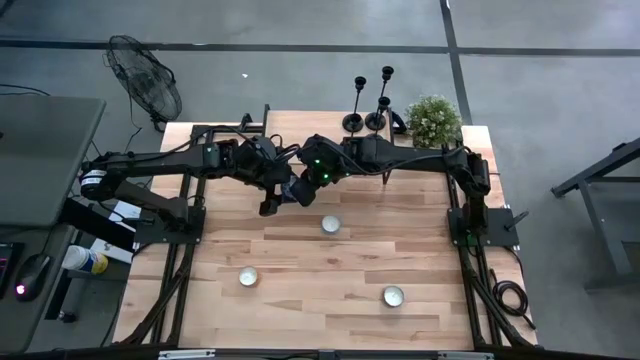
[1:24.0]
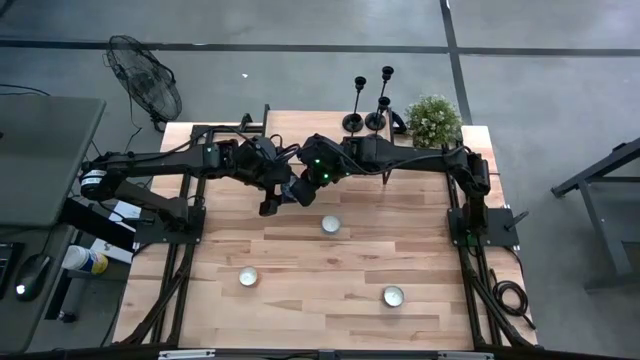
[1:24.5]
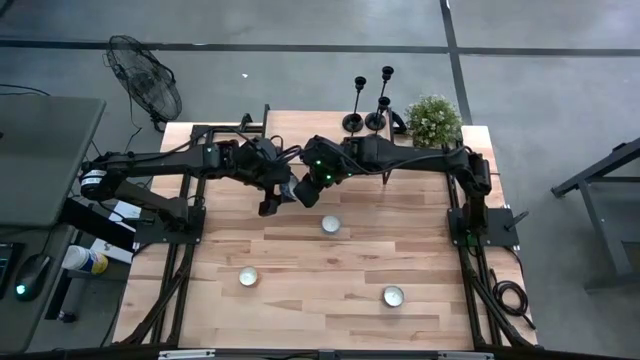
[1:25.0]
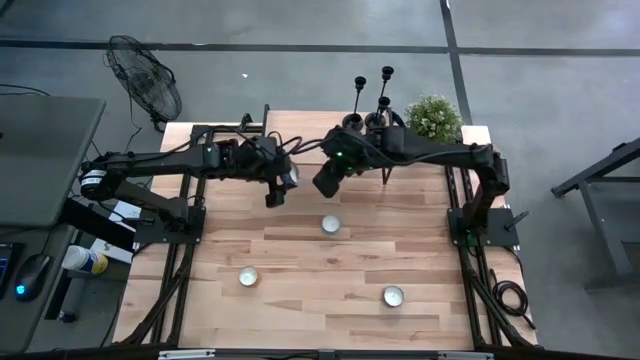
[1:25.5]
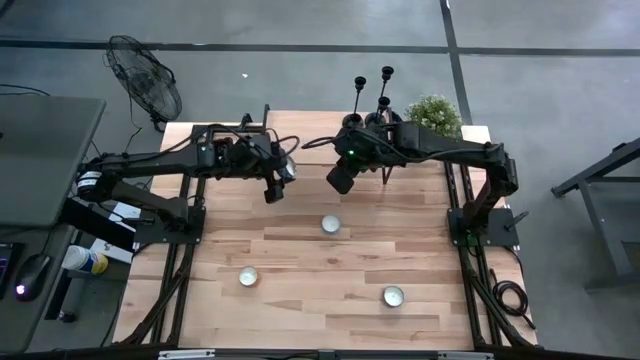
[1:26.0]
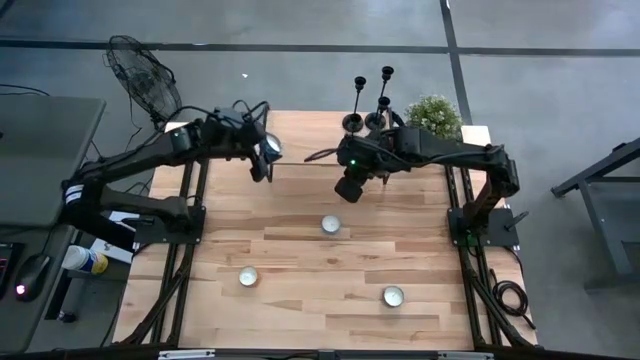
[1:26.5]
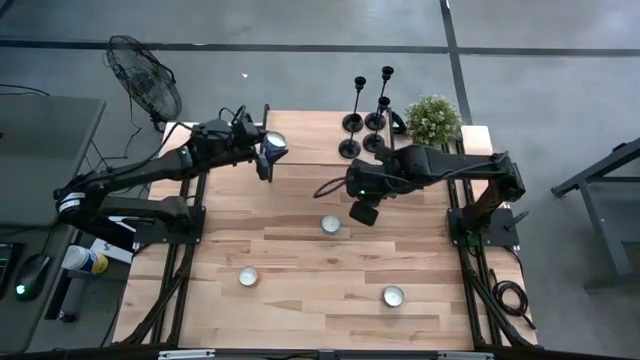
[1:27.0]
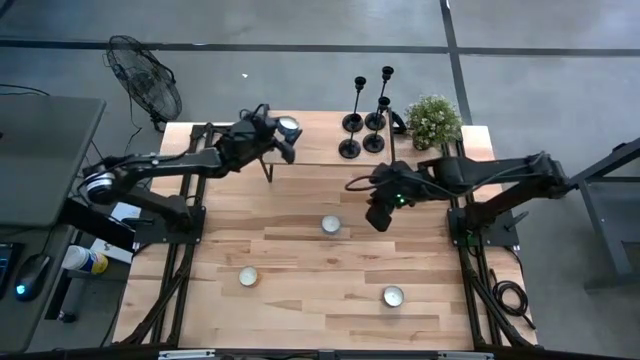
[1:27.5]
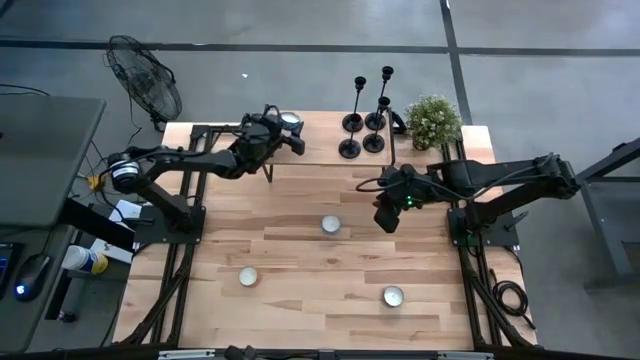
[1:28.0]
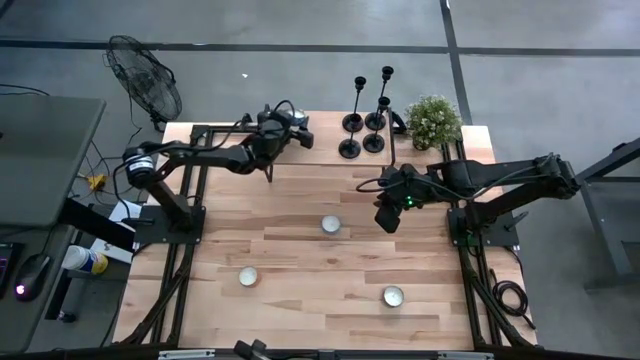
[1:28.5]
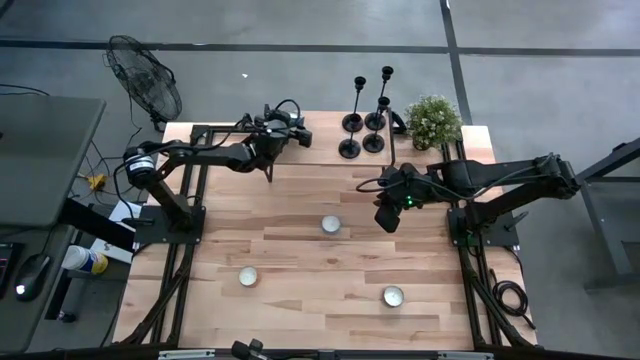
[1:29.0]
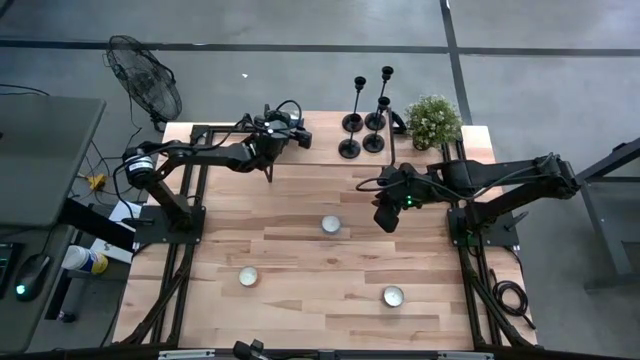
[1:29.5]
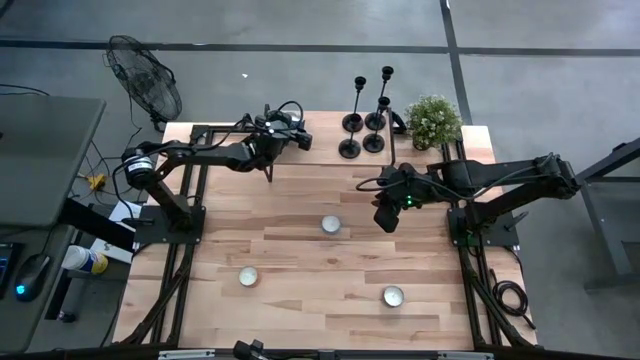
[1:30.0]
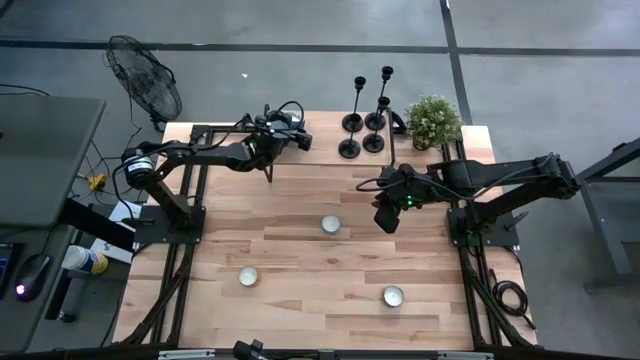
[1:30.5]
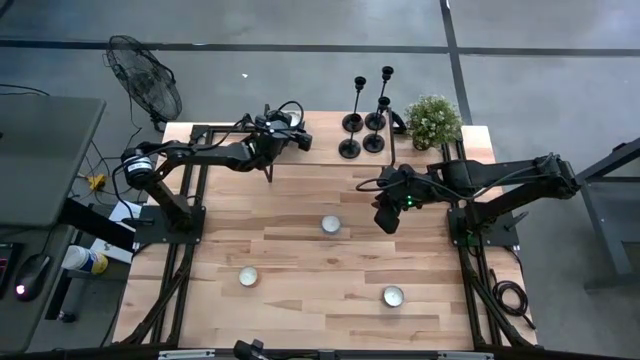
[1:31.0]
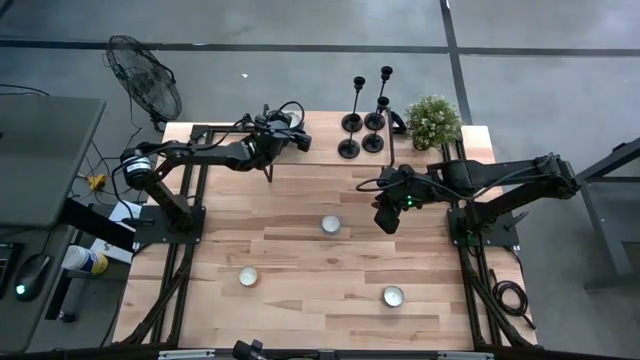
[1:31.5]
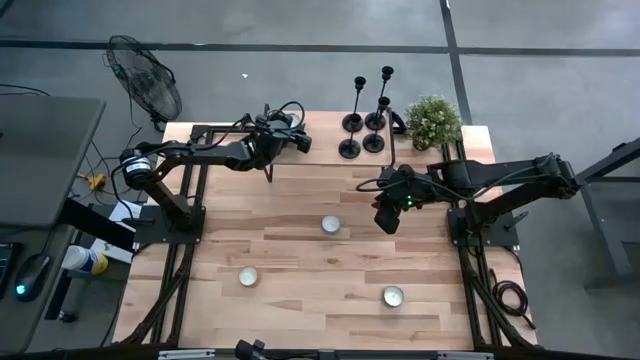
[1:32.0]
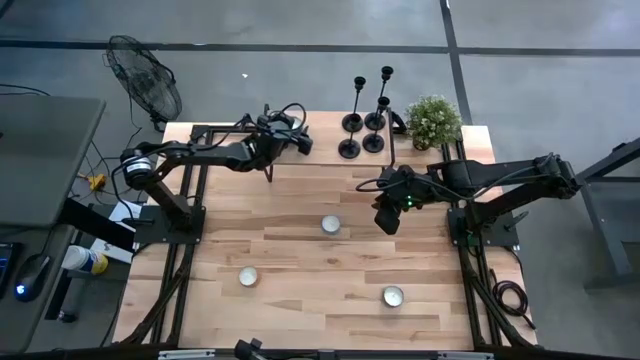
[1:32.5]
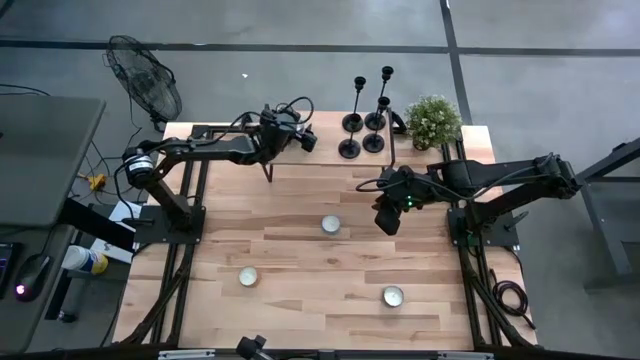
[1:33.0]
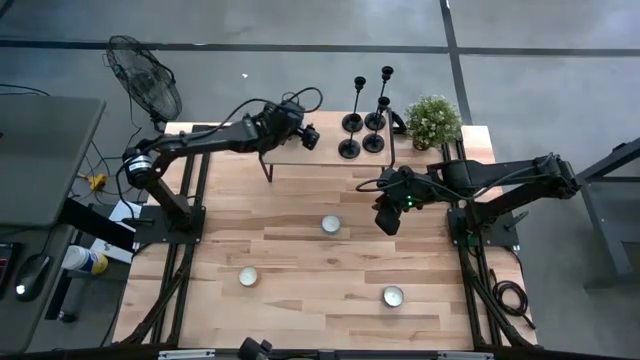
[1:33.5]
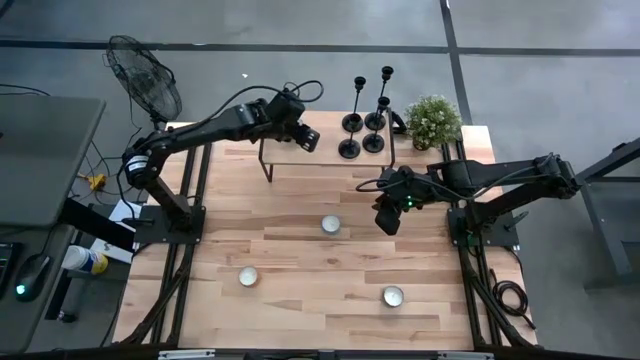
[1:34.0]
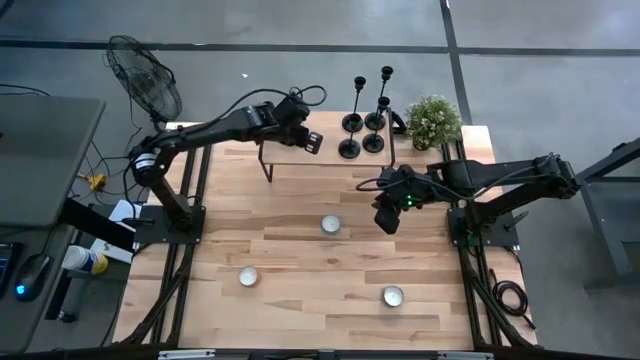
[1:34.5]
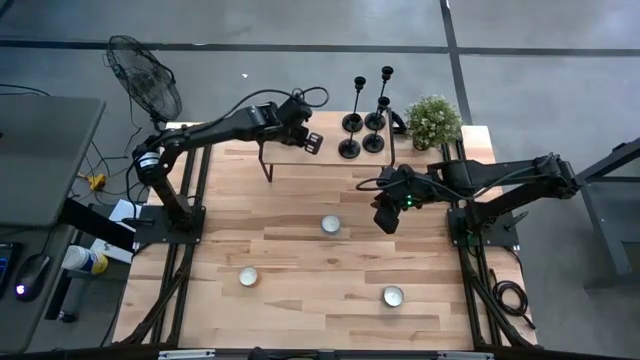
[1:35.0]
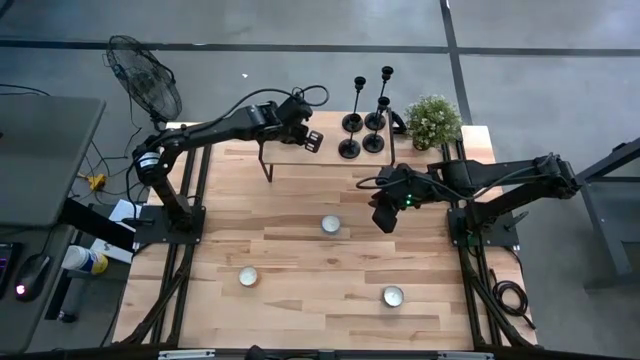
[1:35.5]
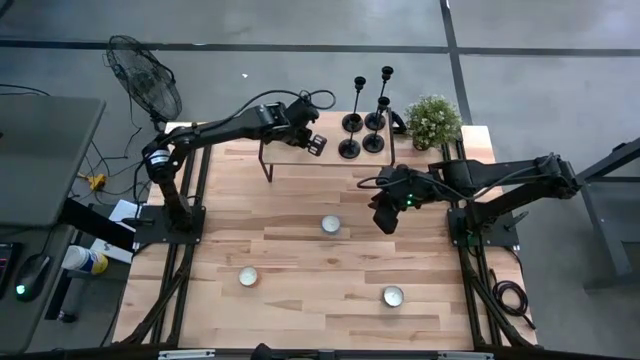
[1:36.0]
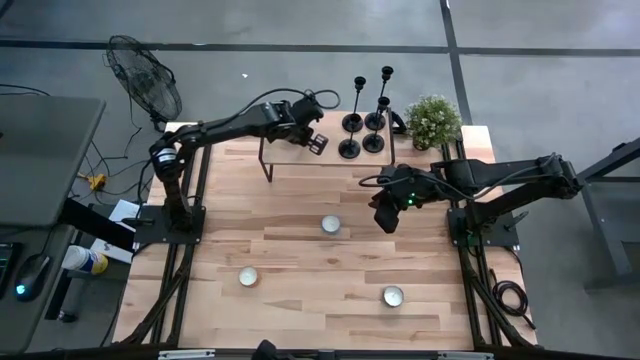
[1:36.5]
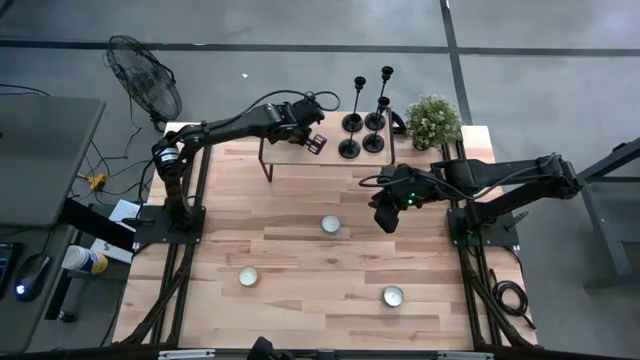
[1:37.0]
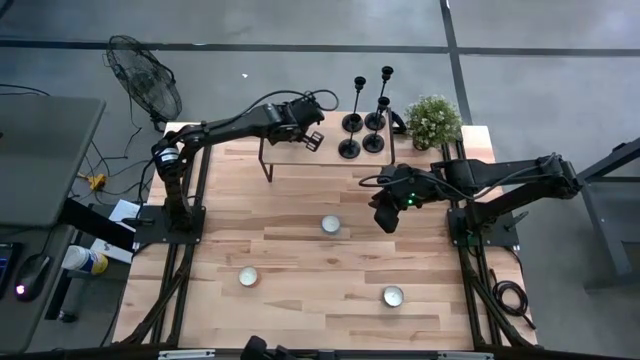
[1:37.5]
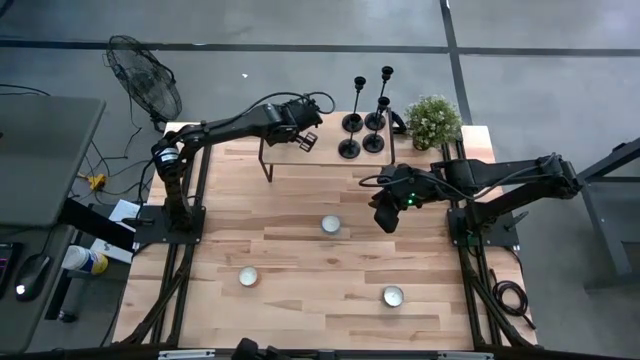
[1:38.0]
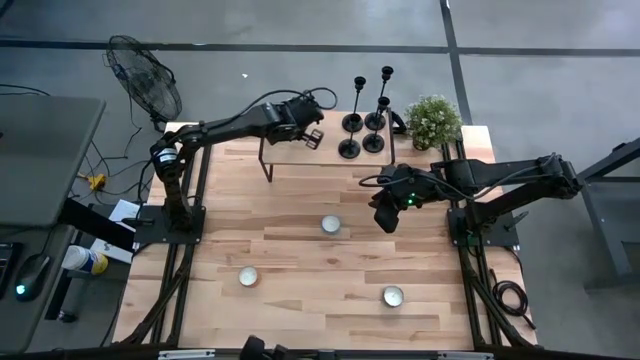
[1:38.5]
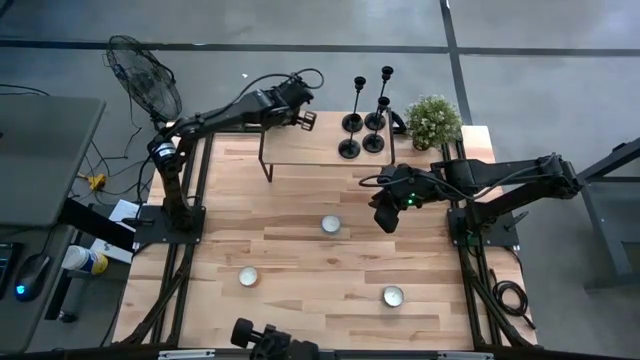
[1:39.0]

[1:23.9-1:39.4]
Task: Pick & Place candle stick holders
Put the blue scented candle on the shelf

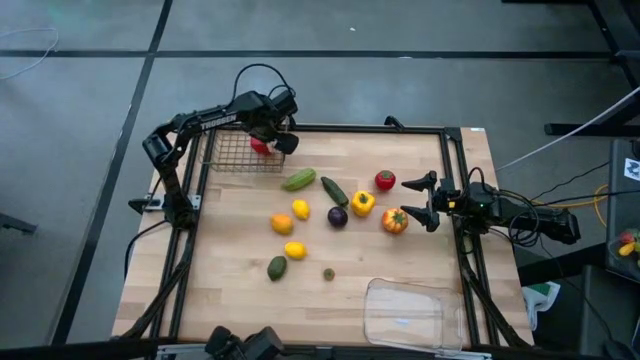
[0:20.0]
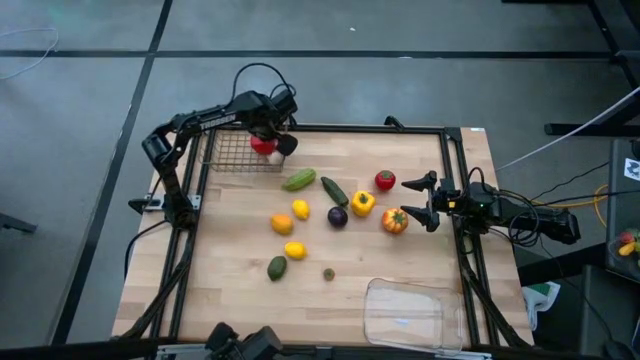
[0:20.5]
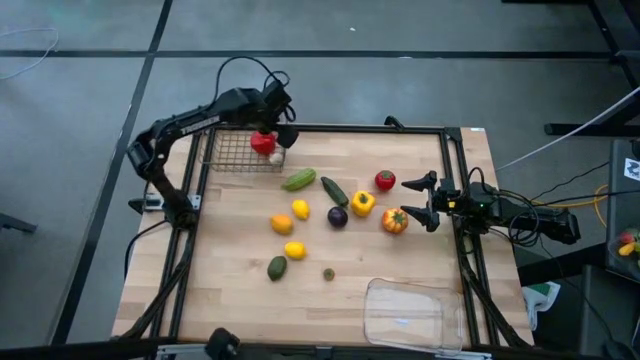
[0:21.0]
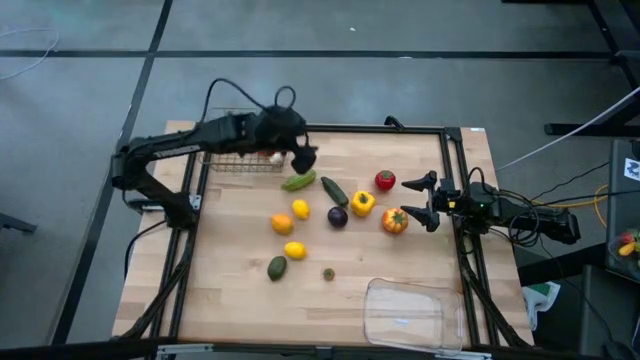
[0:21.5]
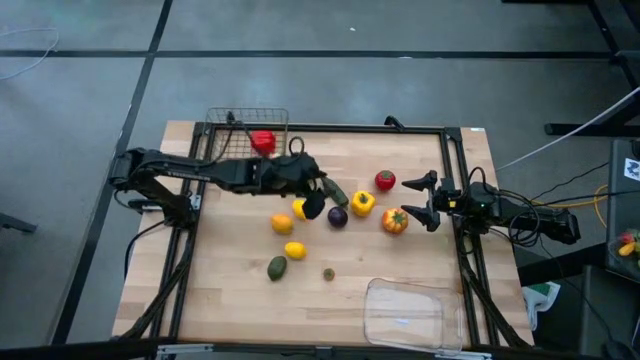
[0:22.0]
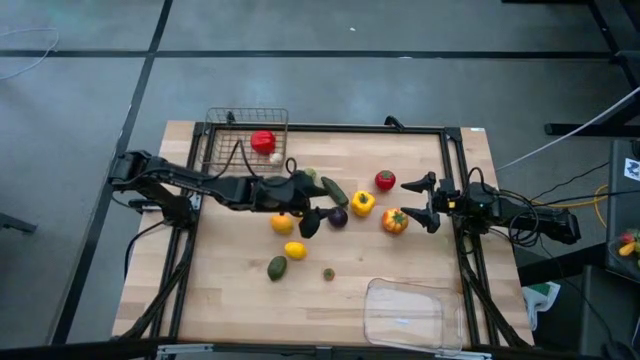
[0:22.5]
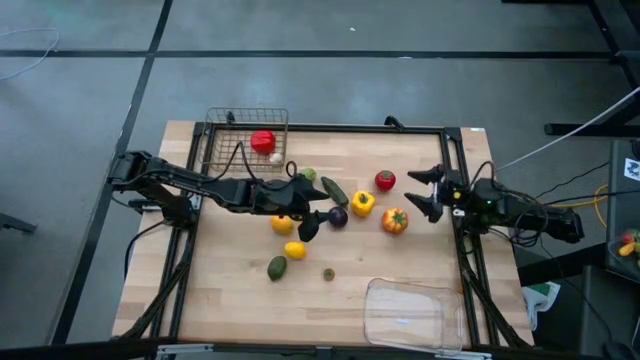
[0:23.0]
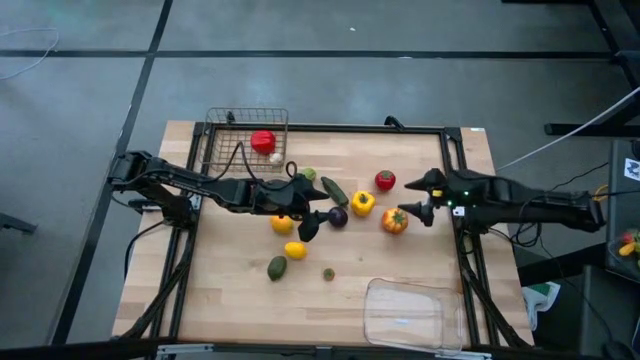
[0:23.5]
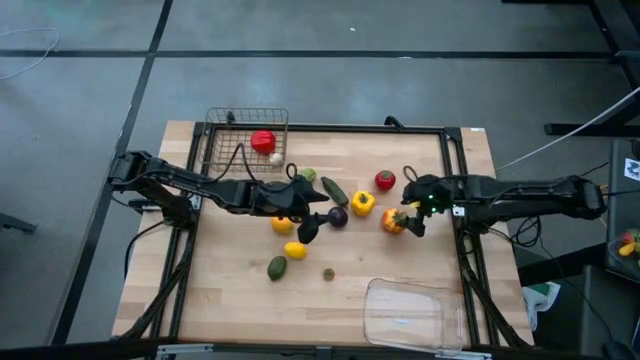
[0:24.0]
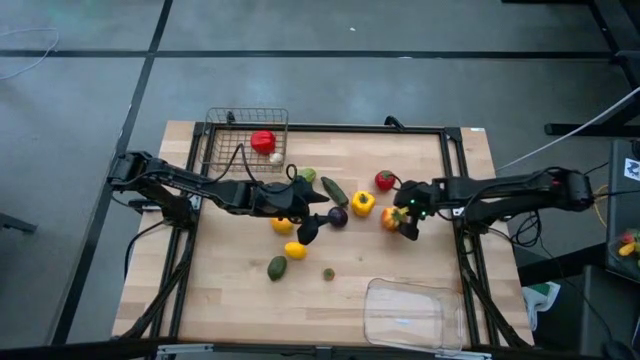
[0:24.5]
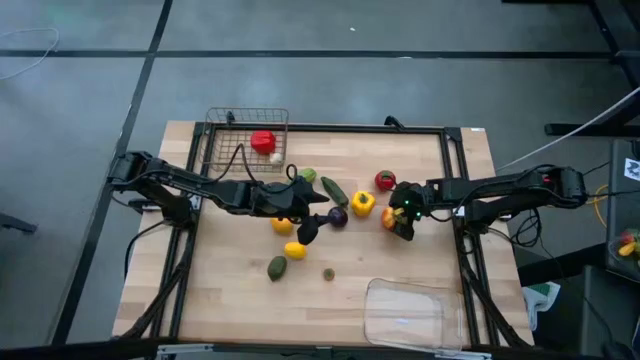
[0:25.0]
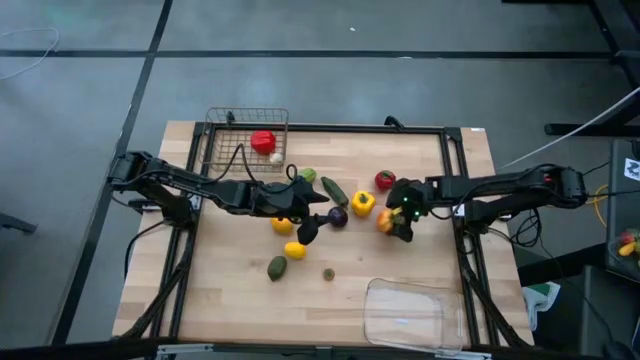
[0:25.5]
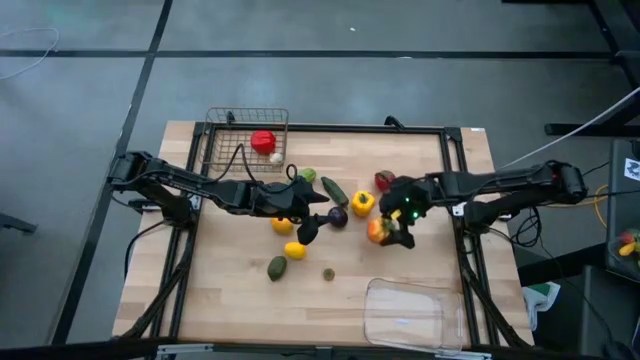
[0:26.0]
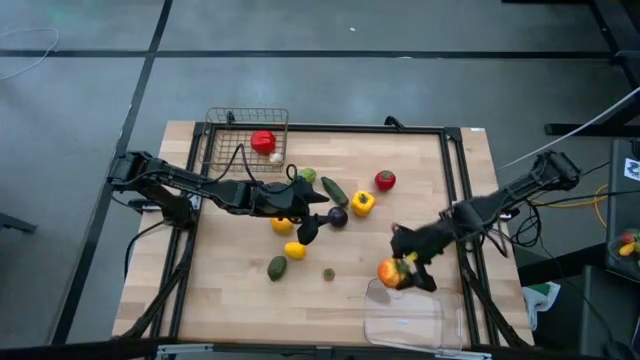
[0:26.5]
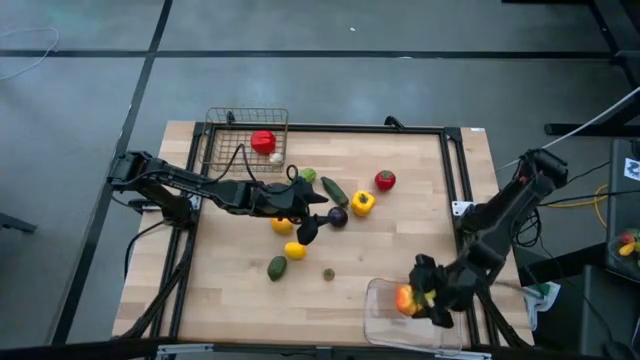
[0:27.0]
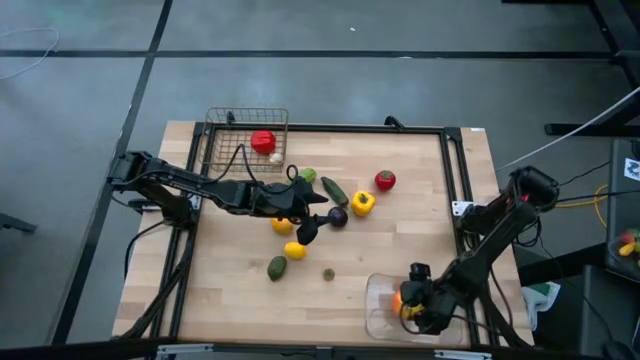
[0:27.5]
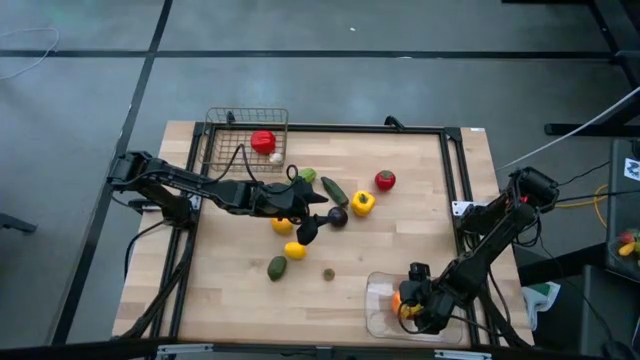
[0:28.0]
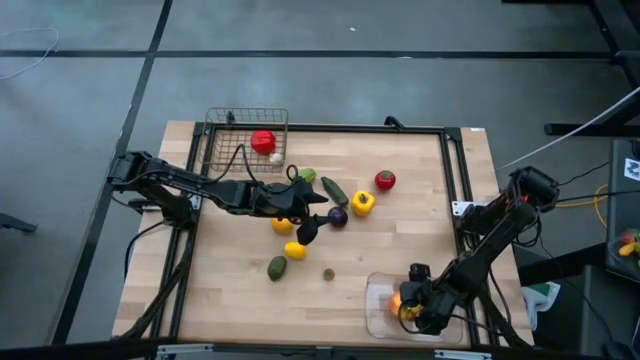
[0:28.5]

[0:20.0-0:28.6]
Task: Sort produce into baskets
Put the large orange tomato into the transparent bin
